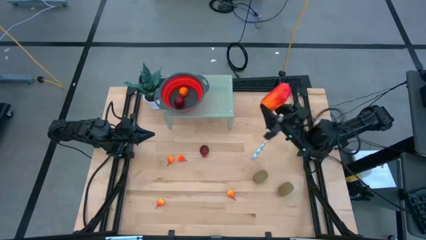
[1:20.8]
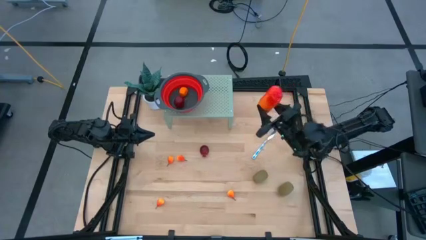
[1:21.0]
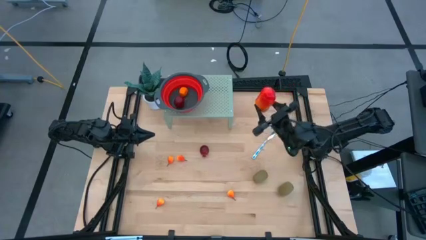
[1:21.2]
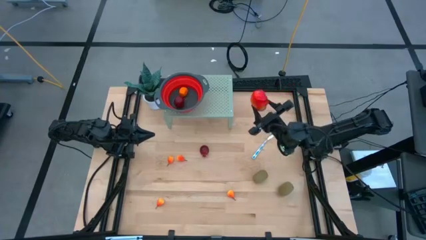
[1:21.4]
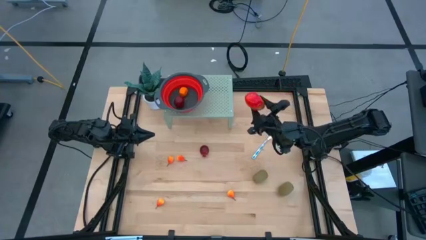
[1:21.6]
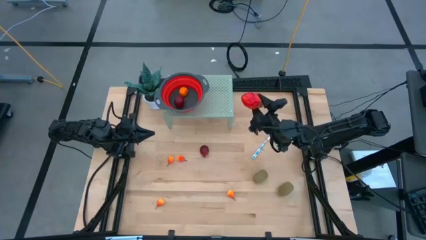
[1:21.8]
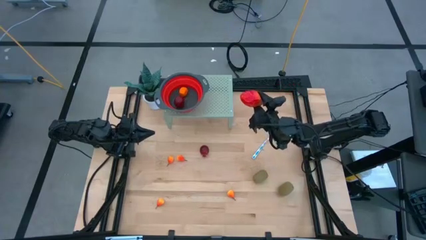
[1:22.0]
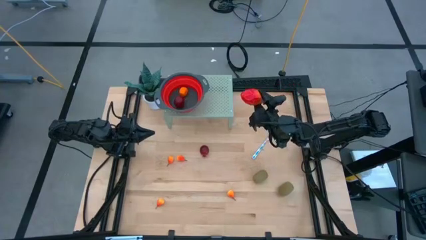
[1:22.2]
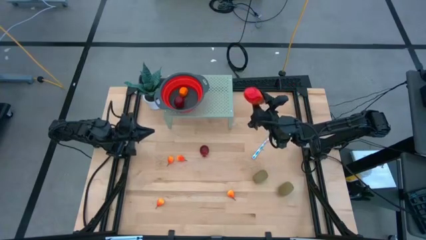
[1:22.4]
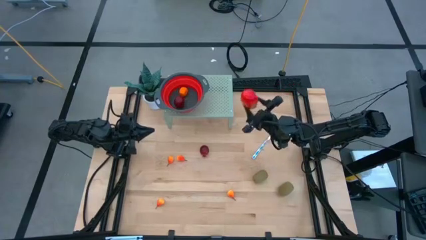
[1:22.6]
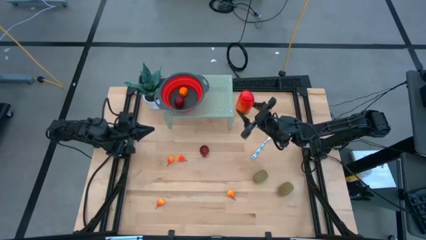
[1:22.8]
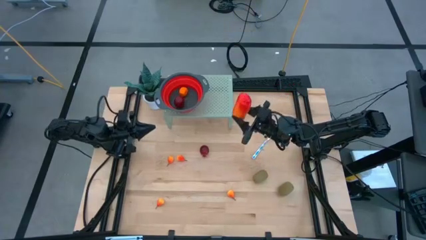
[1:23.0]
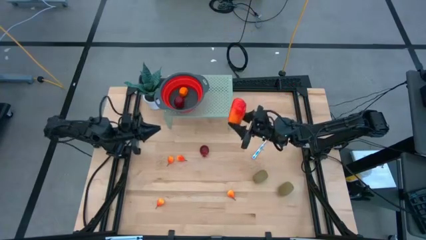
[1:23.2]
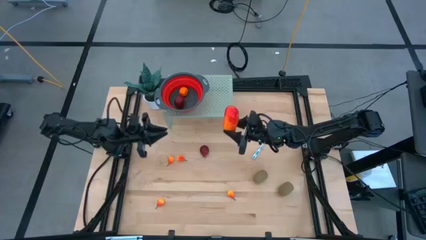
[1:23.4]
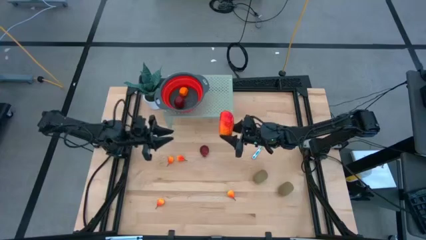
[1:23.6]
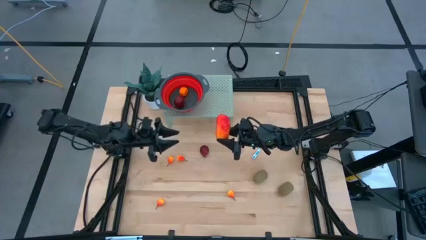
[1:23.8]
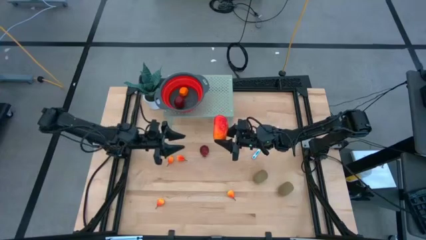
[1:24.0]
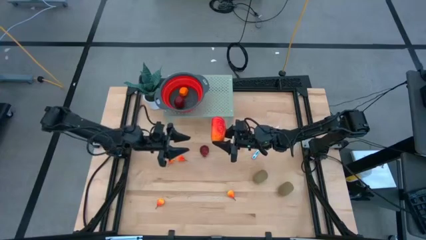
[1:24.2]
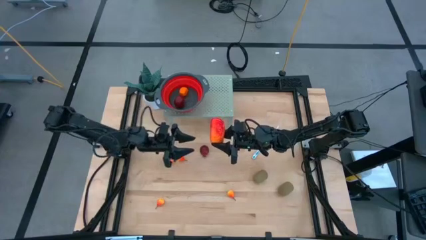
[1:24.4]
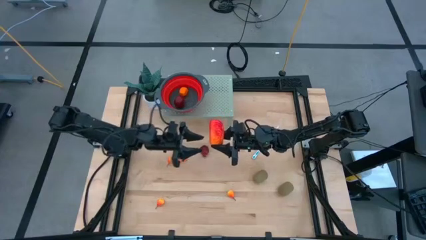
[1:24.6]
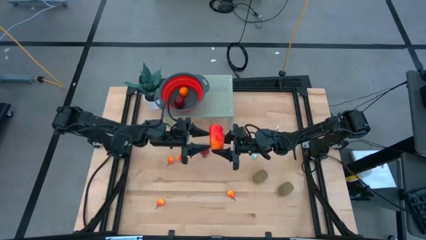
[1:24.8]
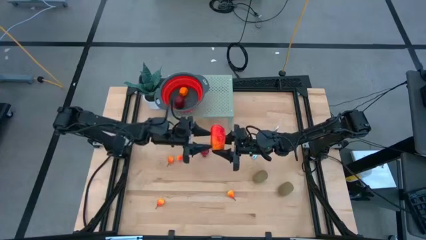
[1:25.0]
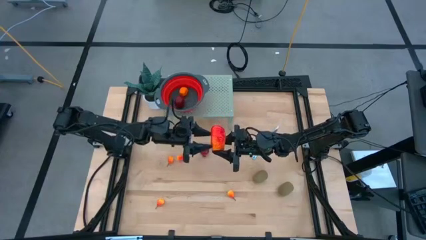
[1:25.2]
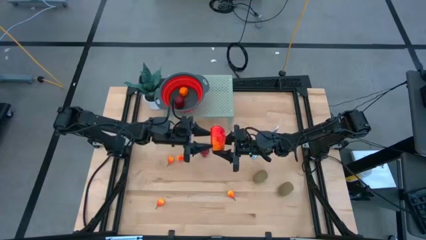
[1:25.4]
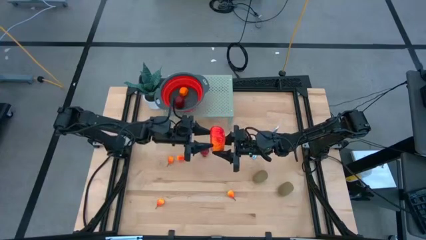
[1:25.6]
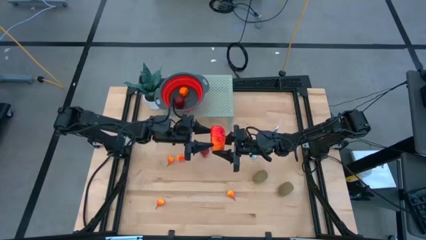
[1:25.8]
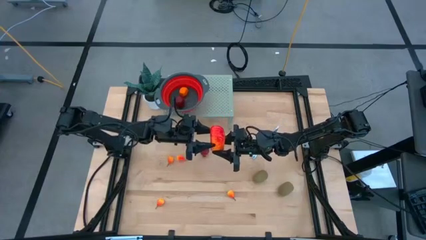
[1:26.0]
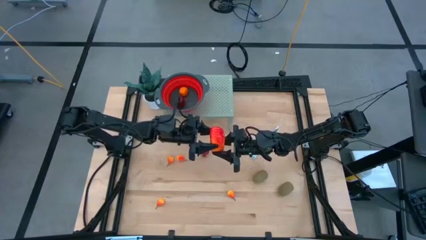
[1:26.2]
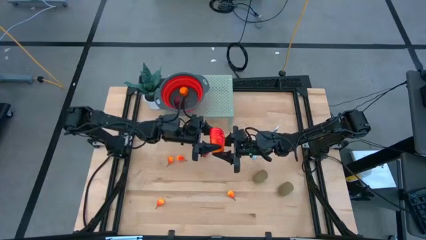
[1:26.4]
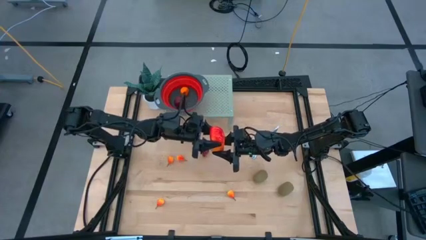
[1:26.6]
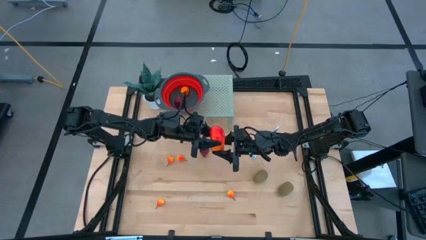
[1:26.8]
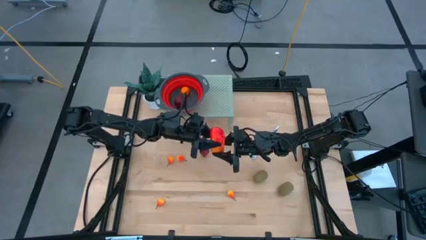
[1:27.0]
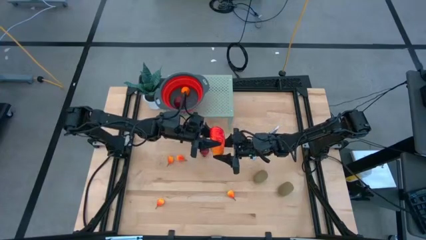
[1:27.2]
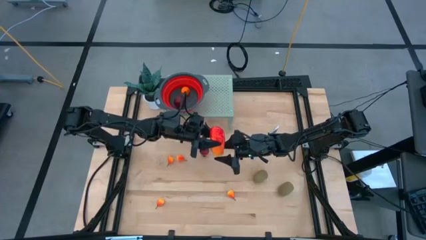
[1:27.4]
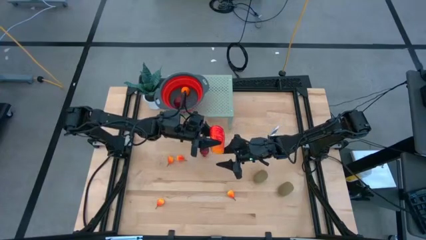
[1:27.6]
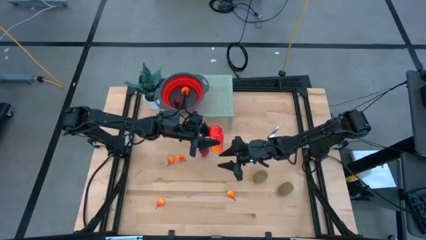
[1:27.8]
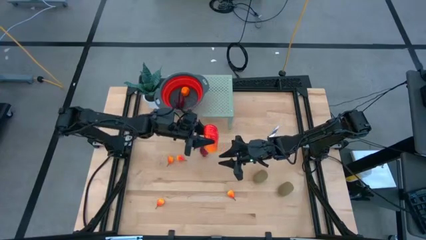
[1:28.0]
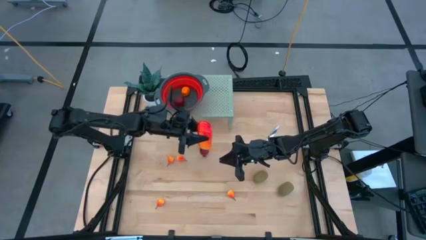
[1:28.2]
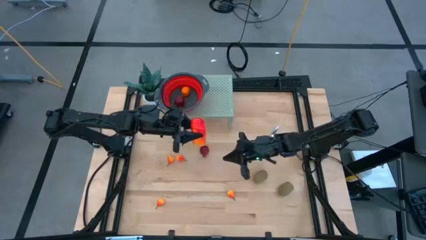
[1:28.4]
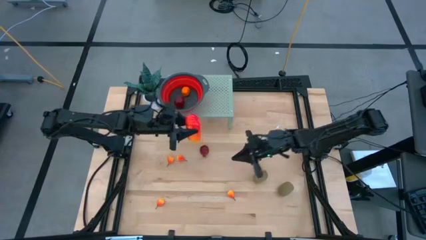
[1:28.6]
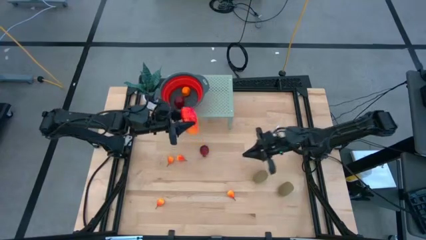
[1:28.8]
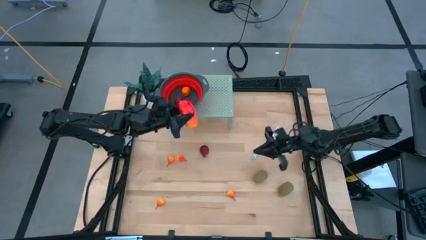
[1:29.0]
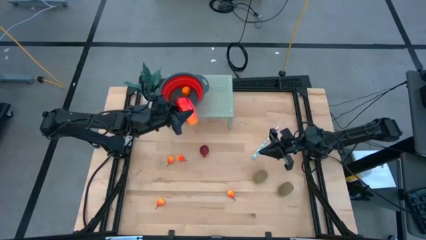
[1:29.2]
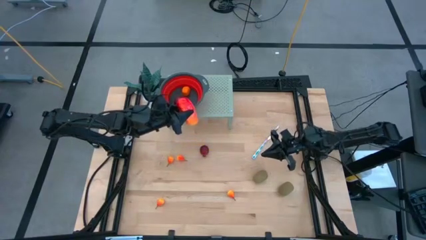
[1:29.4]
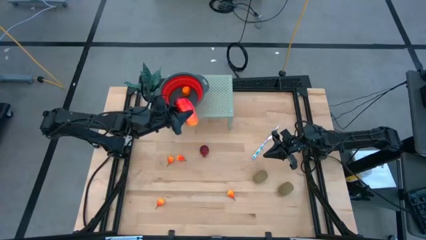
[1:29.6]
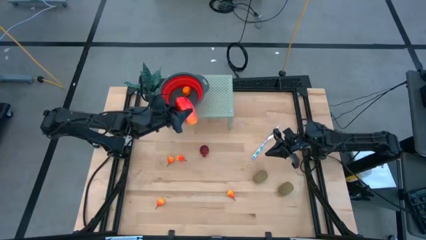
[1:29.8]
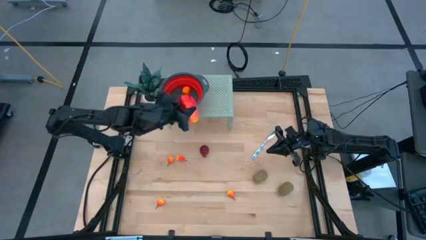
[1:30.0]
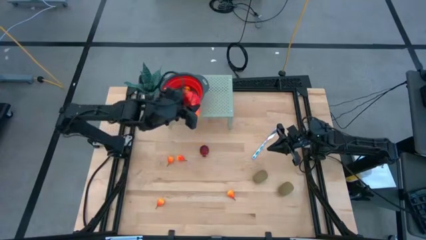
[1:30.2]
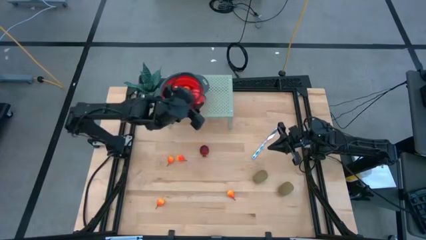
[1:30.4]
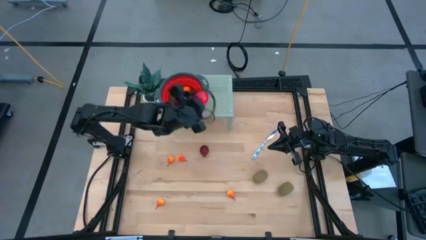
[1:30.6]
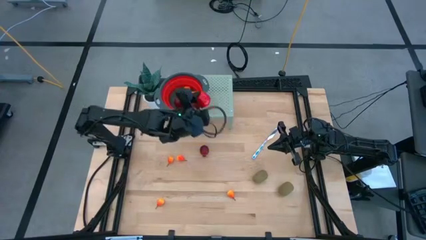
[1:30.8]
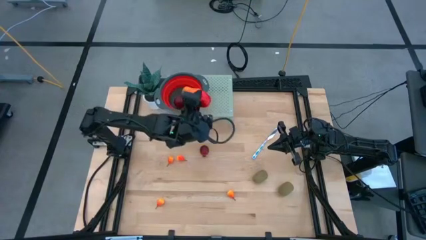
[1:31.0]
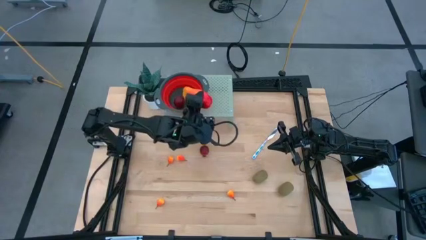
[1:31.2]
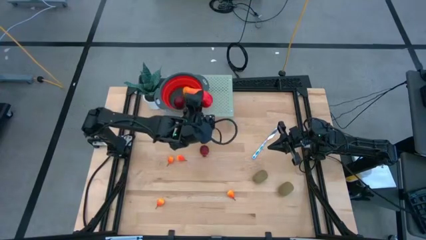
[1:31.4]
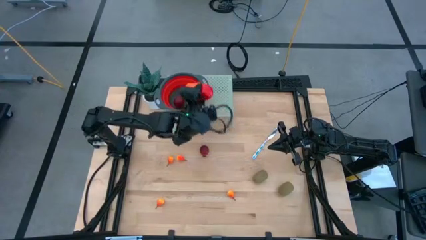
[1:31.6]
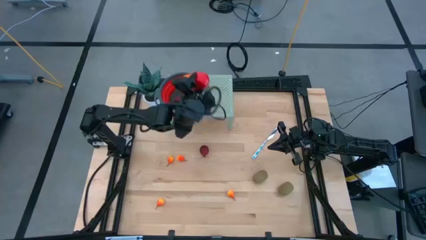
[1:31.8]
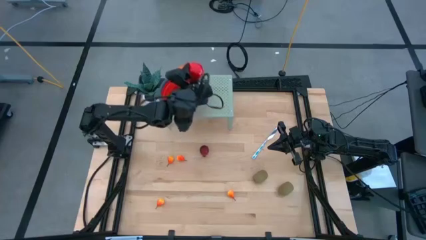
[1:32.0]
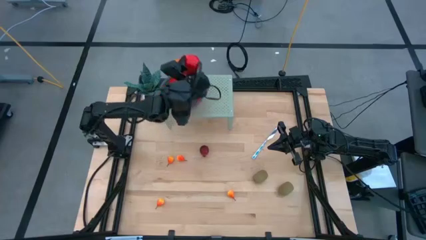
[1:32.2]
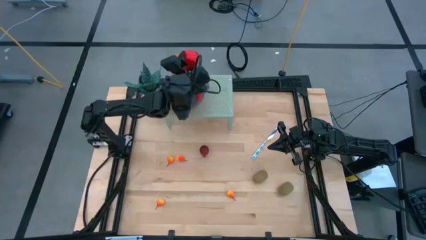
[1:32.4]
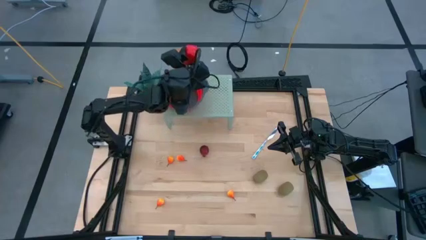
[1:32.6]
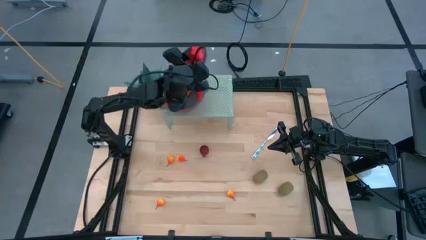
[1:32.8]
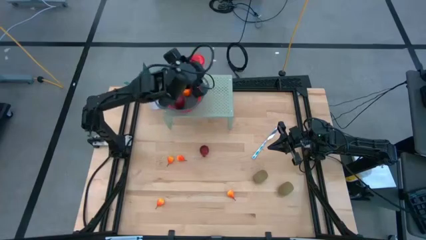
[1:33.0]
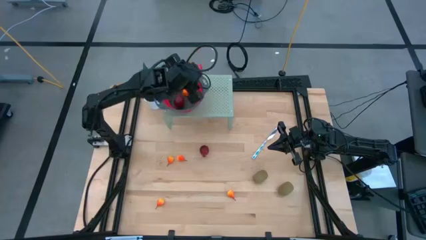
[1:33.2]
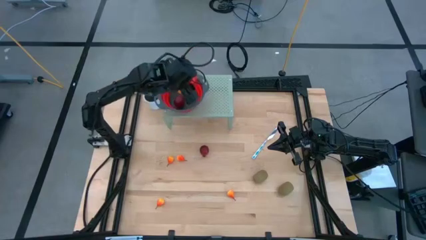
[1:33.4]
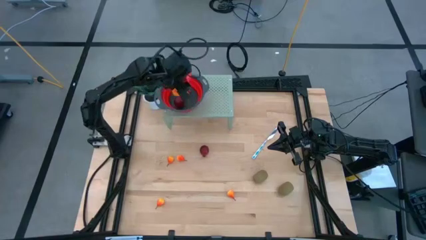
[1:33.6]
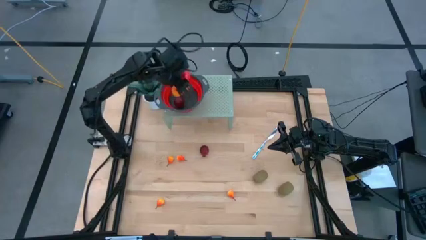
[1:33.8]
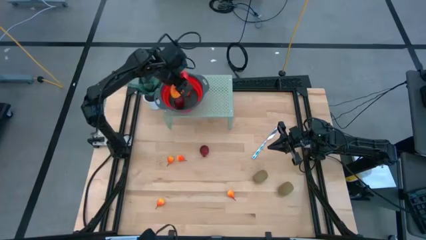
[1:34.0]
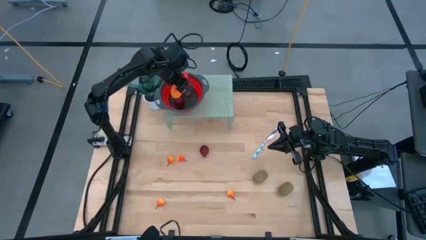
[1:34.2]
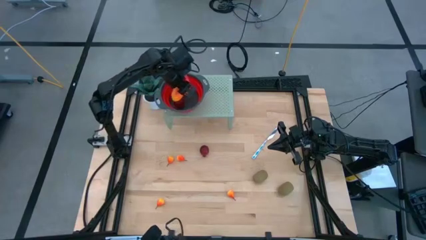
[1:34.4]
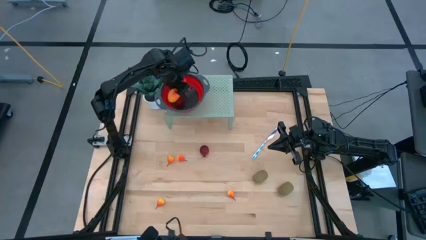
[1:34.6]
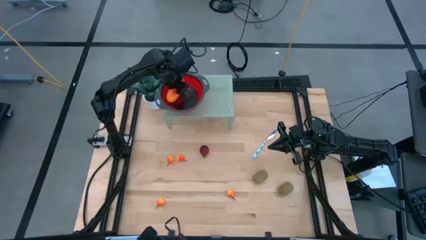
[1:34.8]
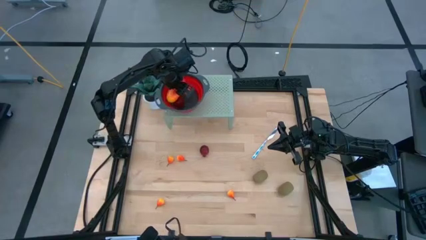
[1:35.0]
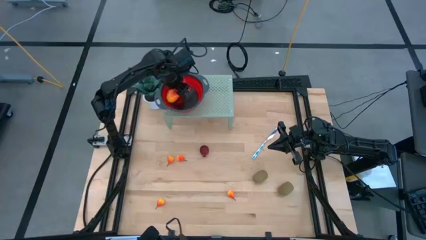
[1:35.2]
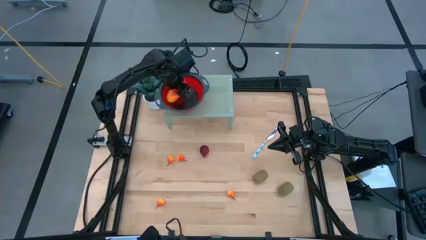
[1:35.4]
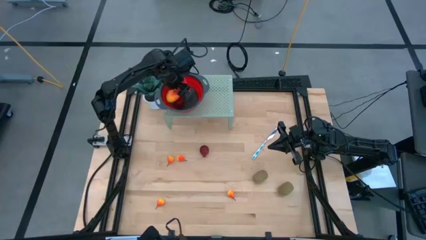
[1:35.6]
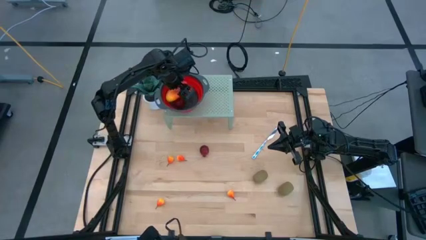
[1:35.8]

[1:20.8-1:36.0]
Task: Pick & Place Fruit
Put the mango into the red strainer bowl on the shelf
